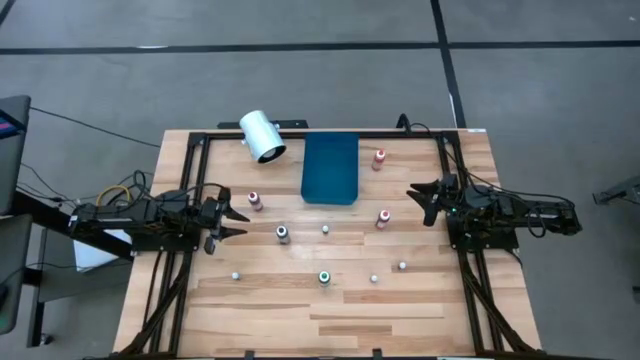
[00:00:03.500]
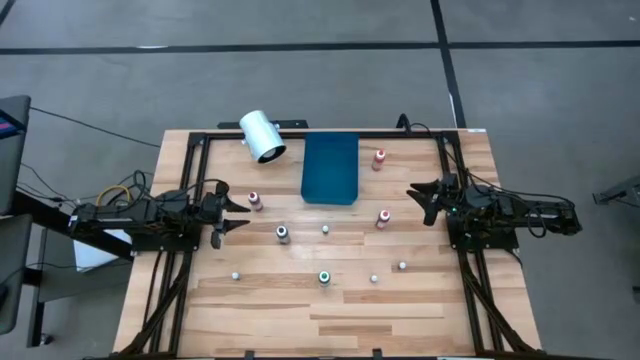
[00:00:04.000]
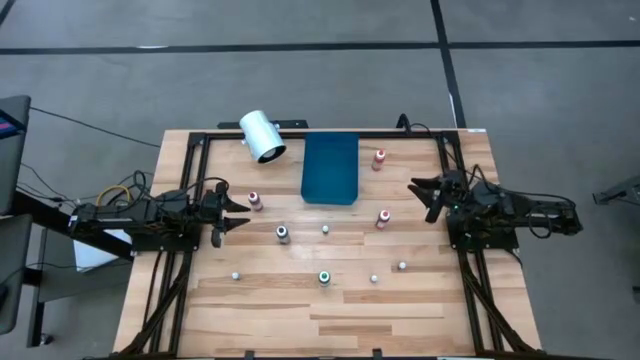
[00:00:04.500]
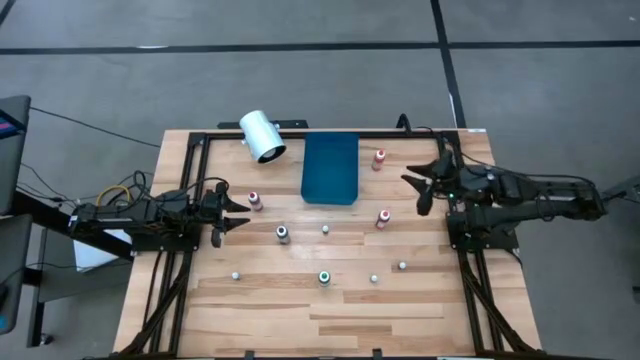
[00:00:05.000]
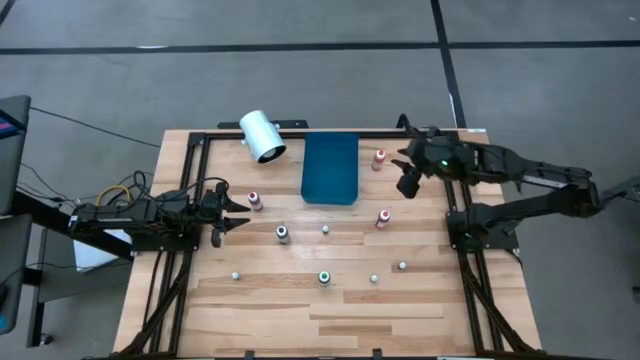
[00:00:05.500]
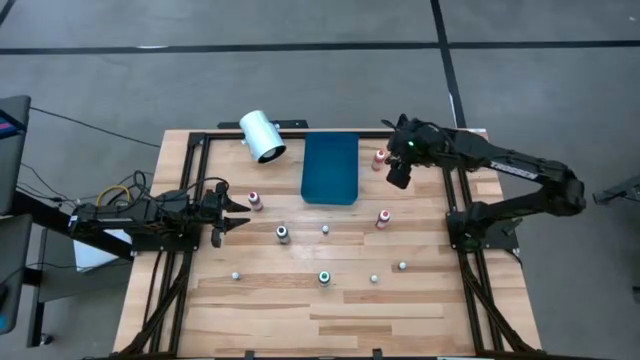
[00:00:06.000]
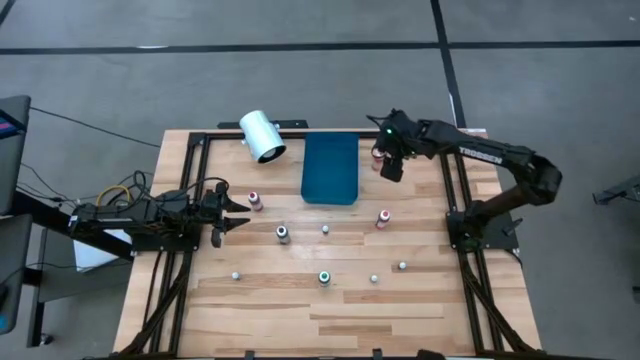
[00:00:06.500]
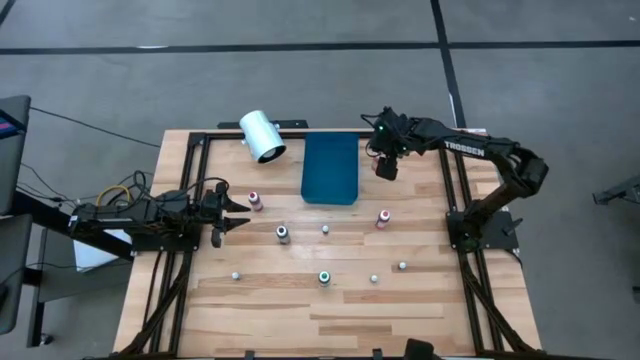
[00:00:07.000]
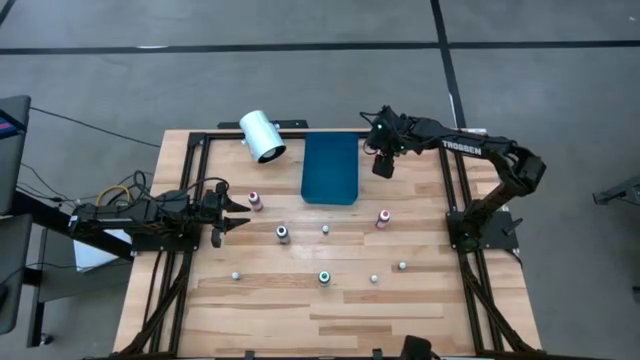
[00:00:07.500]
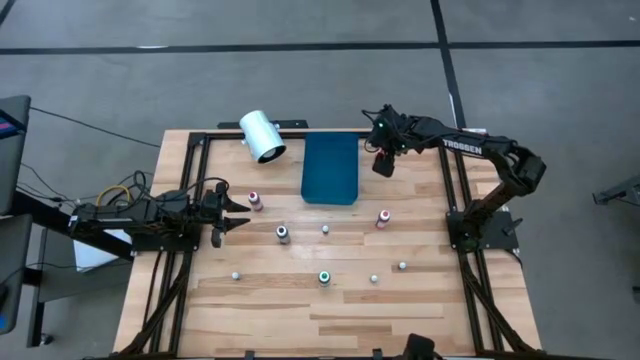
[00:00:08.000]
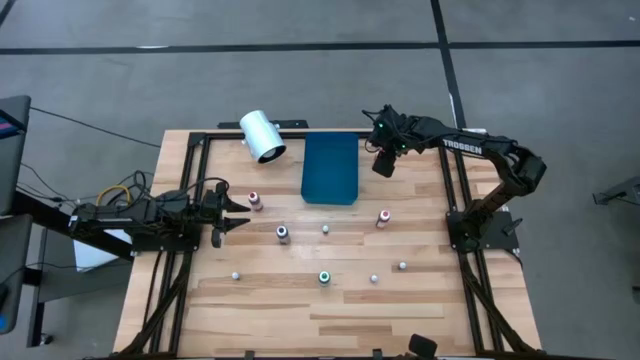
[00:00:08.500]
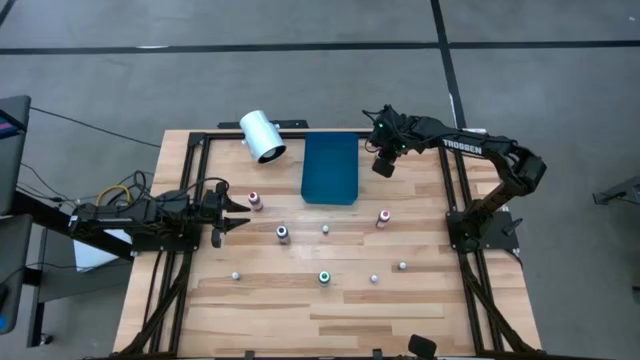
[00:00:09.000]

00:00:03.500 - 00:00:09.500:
Task: Pick & Place food coloring
Put the big orange food coloring bottle into the blue bin

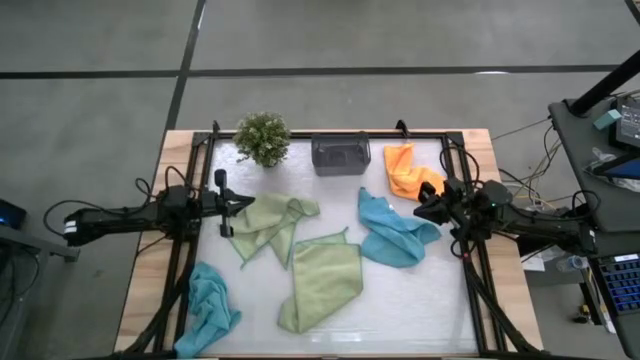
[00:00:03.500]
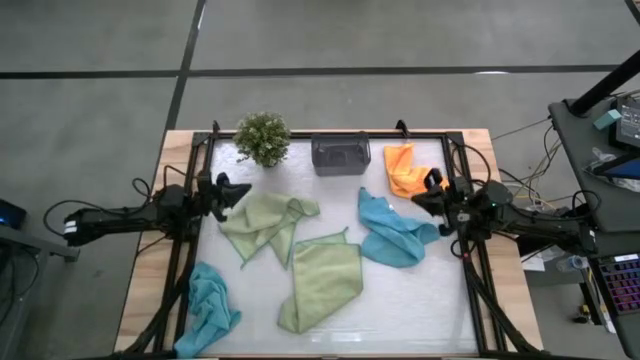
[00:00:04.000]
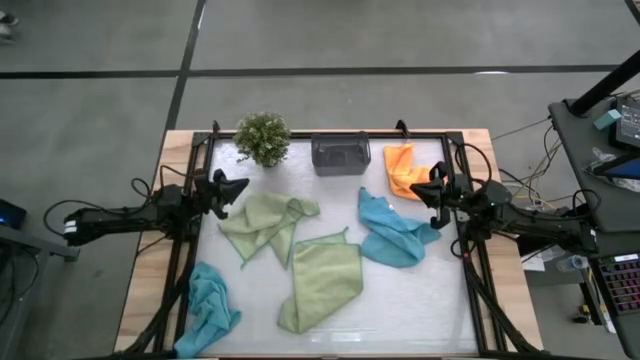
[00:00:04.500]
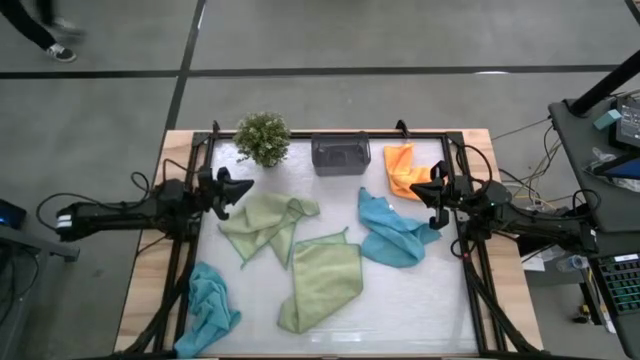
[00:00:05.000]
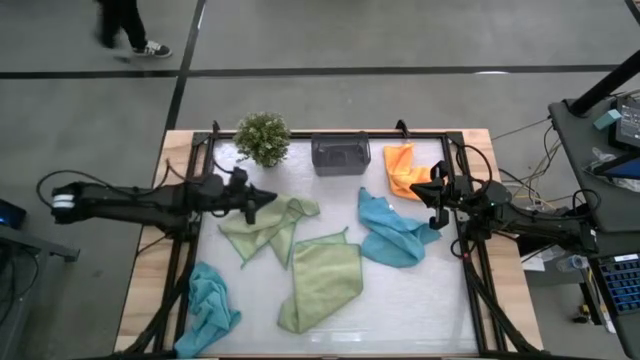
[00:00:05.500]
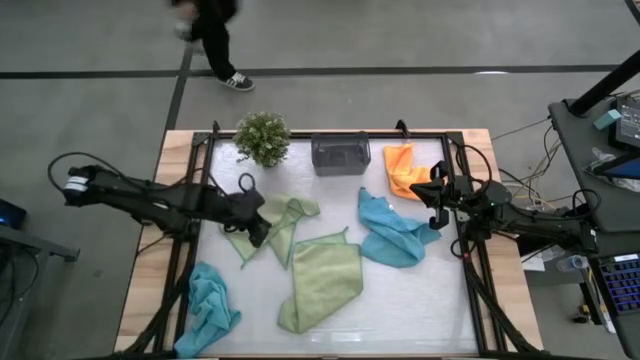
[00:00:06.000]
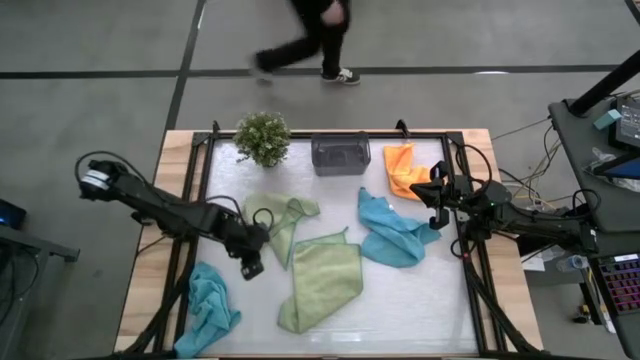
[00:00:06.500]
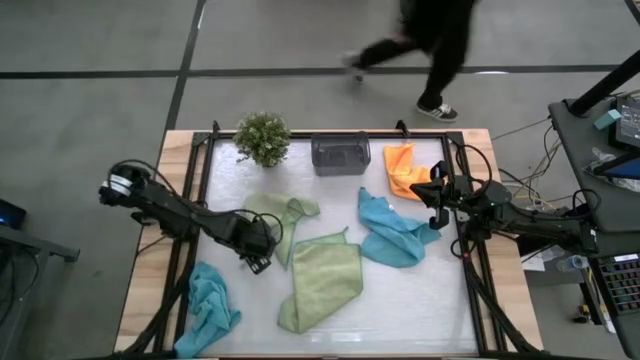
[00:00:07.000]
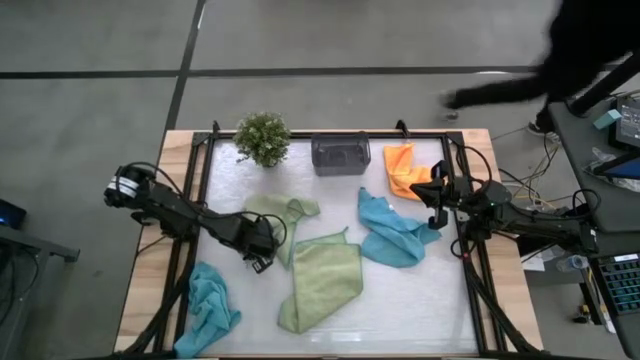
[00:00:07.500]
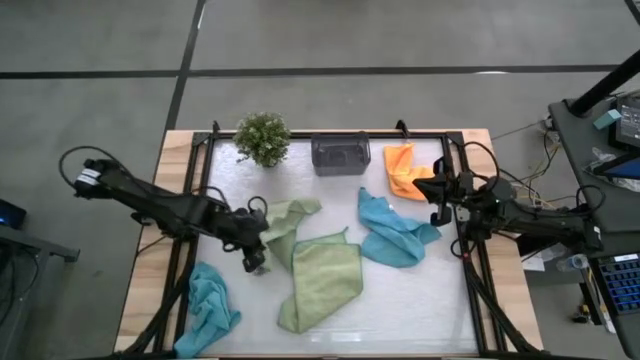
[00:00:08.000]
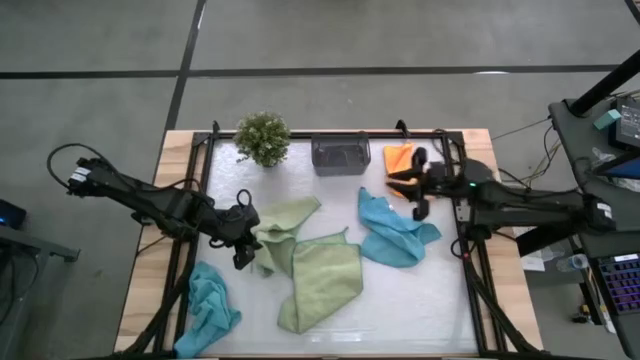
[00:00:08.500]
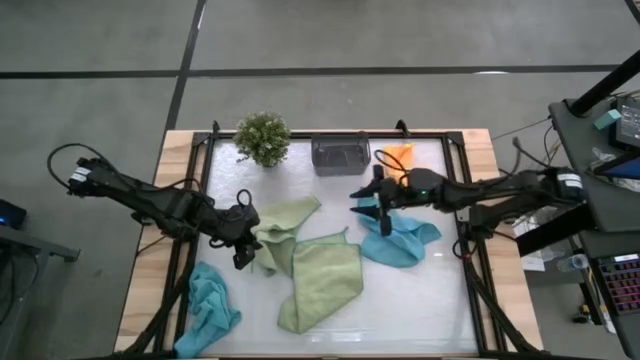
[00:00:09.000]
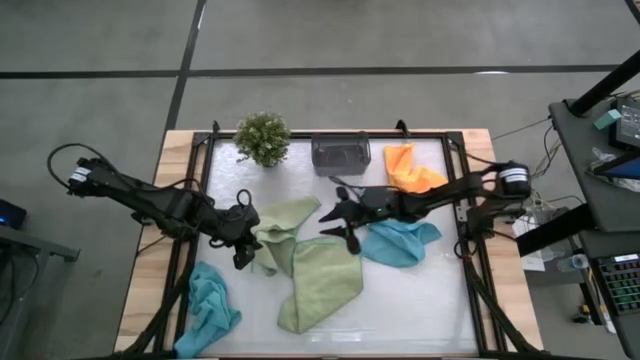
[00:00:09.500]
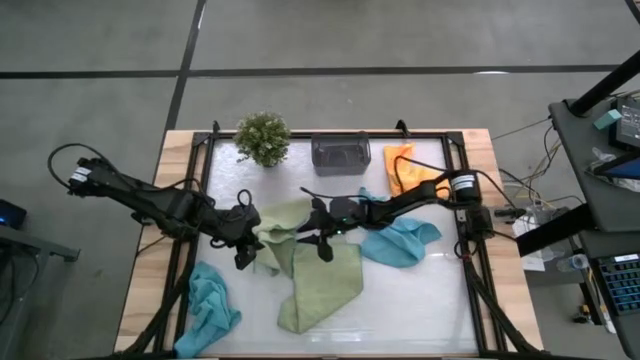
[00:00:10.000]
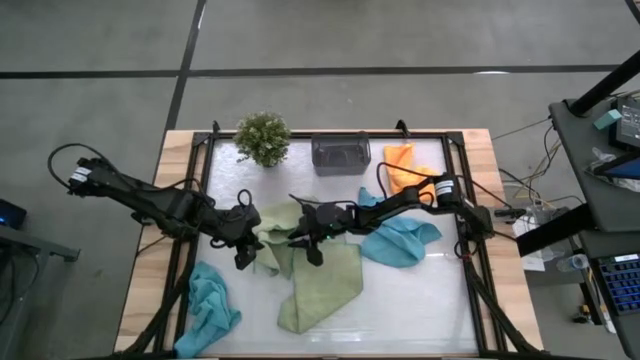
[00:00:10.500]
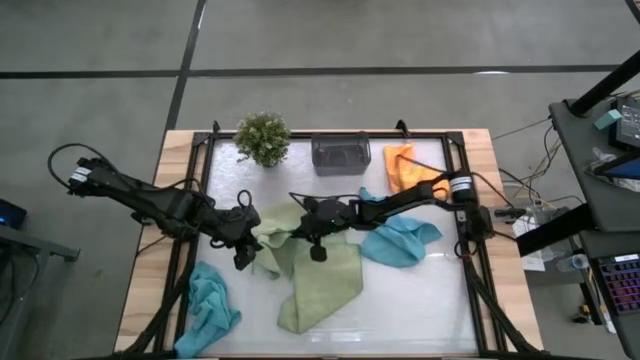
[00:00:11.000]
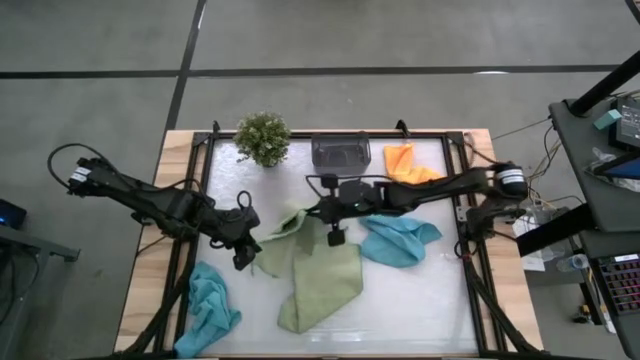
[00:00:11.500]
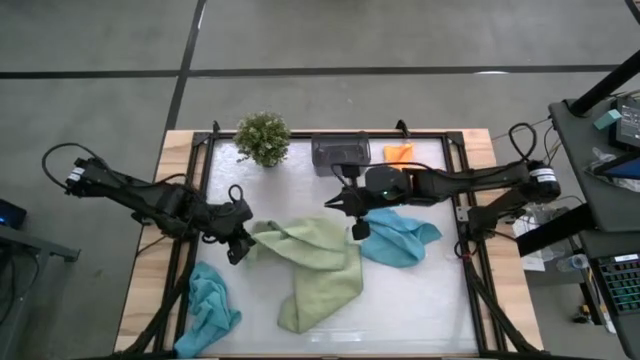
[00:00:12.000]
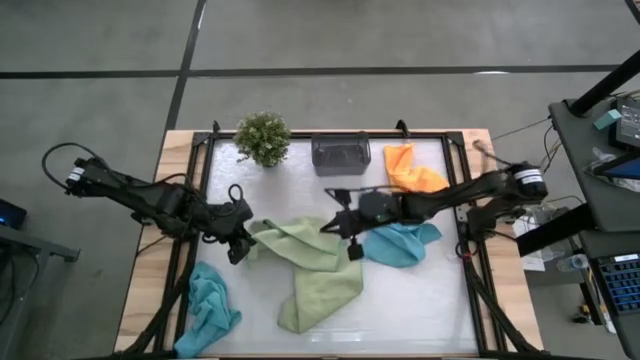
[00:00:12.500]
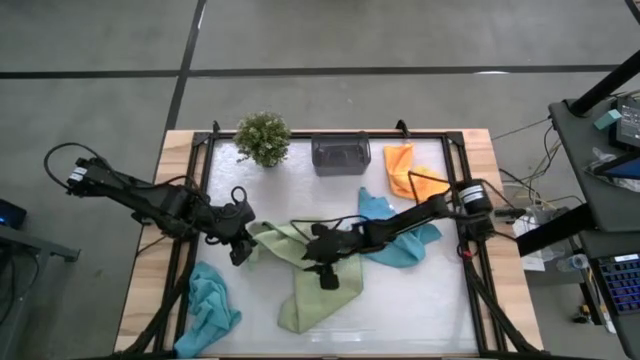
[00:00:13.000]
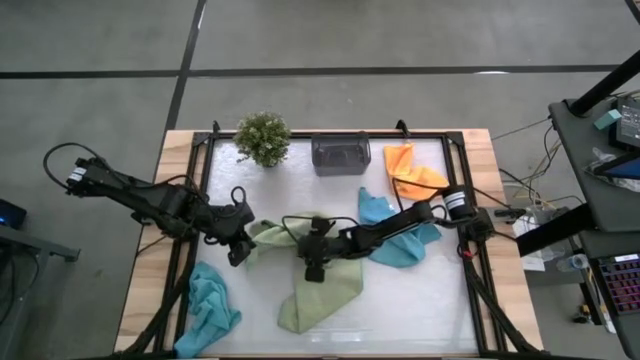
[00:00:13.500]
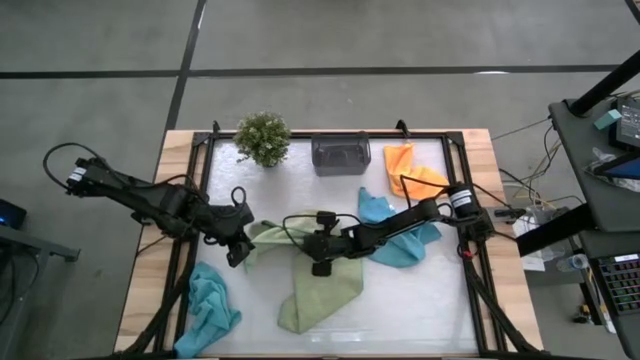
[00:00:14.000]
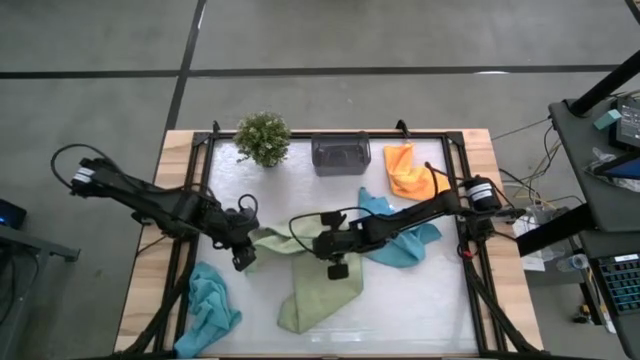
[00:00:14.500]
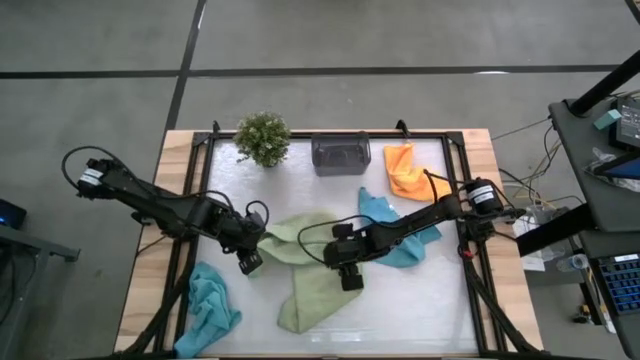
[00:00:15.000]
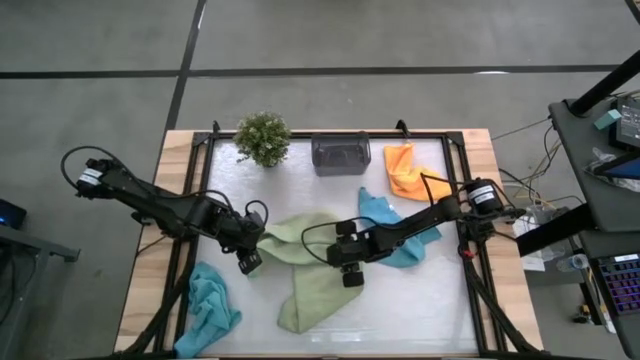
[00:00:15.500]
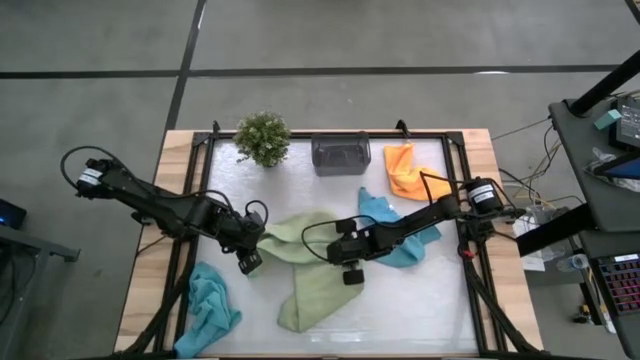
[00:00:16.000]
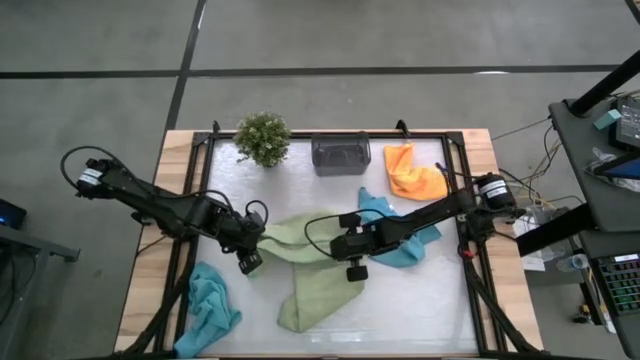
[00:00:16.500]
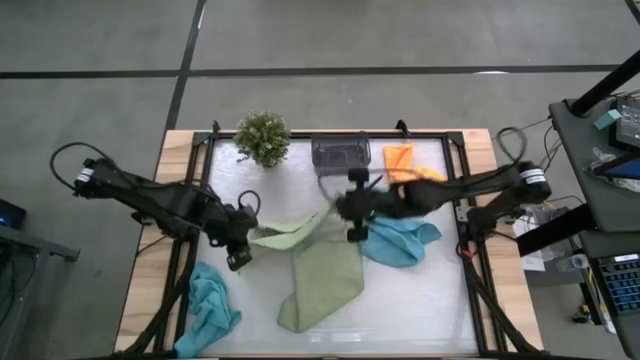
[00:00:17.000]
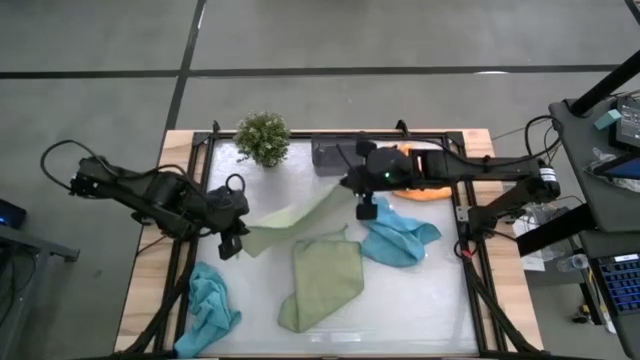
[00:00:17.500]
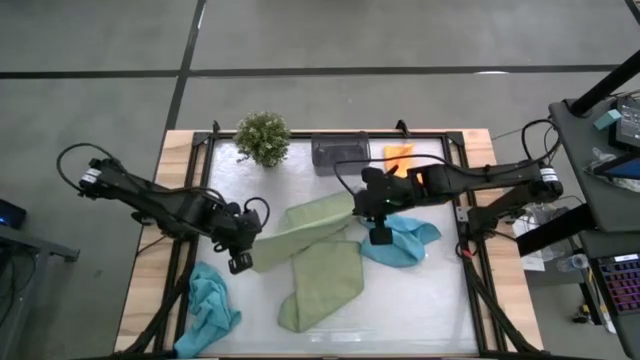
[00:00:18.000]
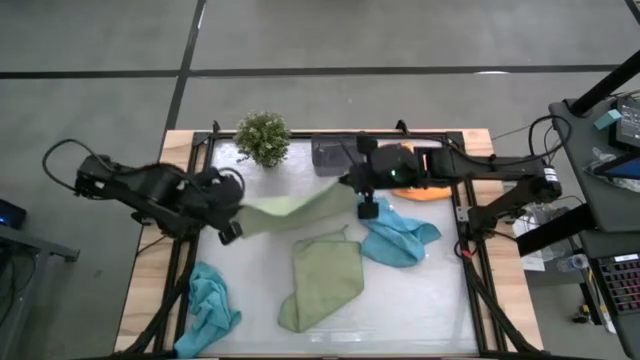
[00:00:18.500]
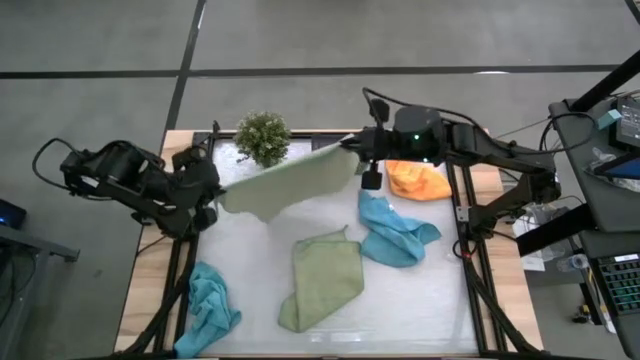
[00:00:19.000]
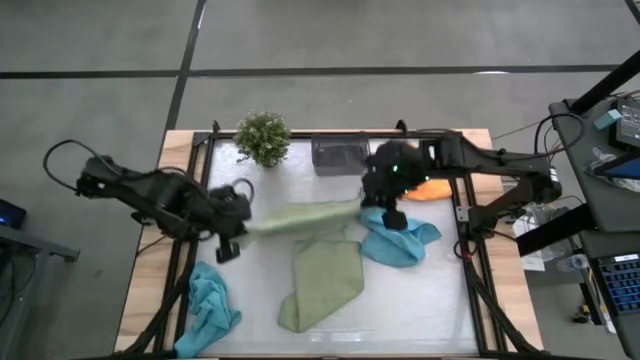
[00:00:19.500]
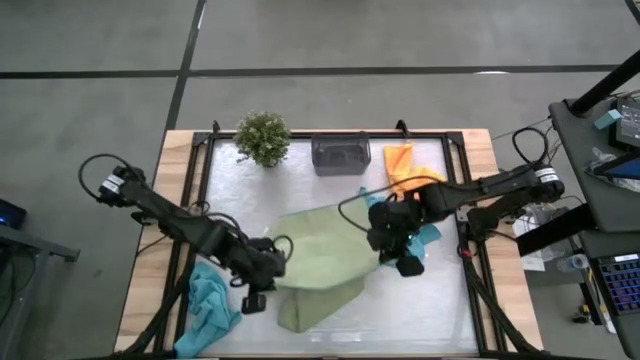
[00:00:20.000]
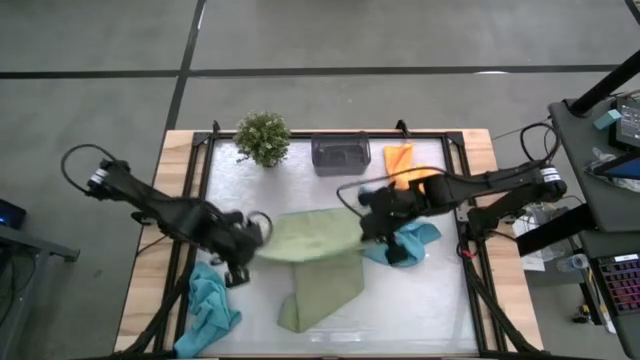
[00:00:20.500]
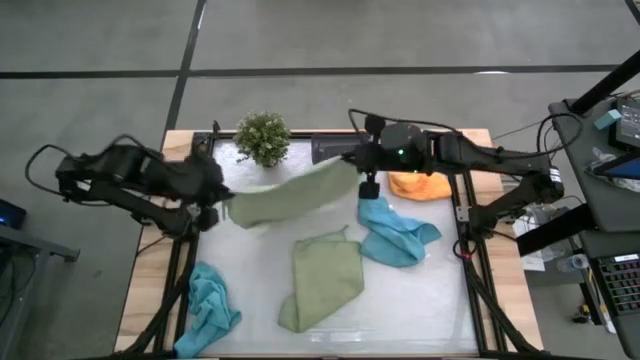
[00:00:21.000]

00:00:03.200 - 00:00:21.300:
Task: Fold microfiber towels
Fold the left green towel
